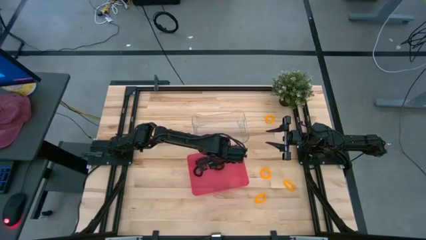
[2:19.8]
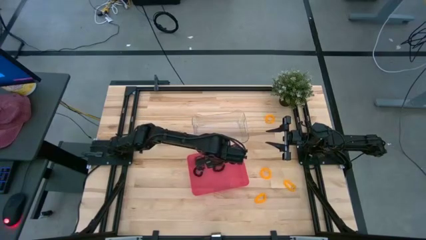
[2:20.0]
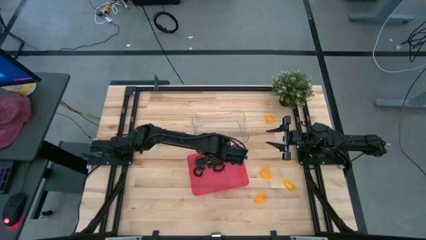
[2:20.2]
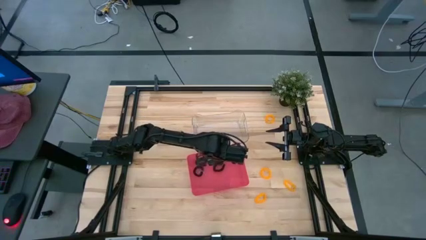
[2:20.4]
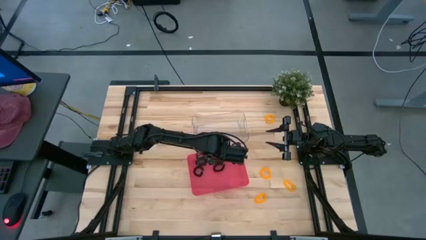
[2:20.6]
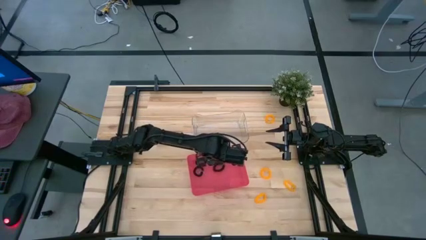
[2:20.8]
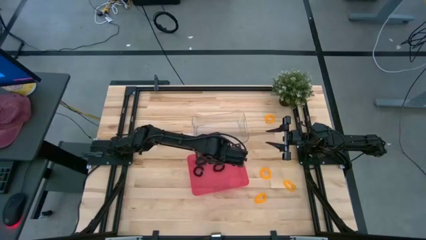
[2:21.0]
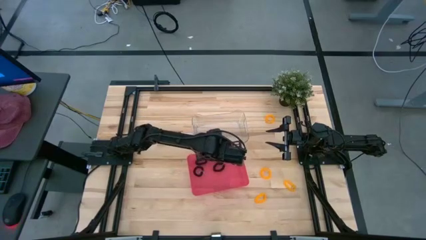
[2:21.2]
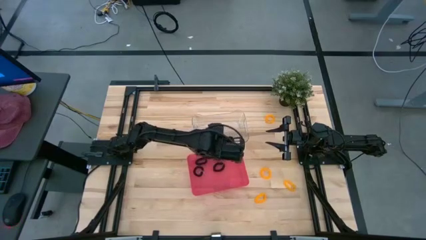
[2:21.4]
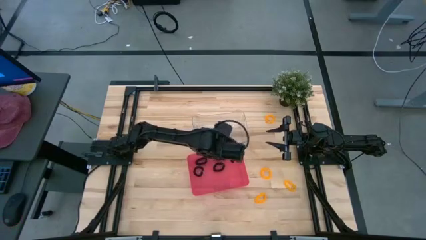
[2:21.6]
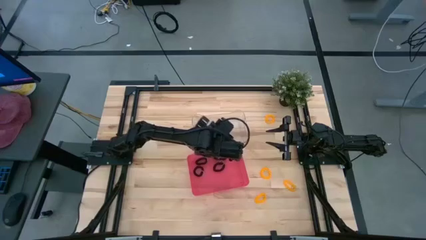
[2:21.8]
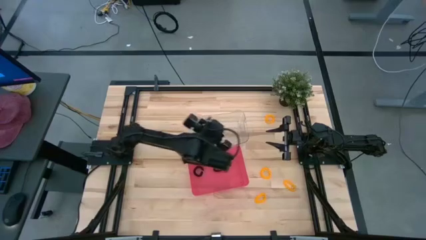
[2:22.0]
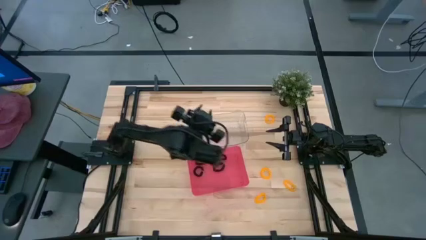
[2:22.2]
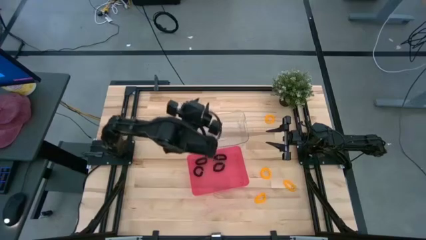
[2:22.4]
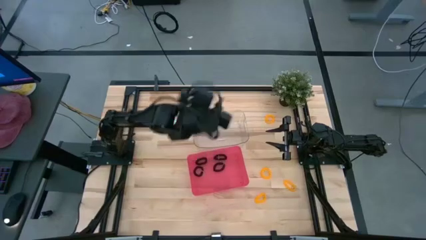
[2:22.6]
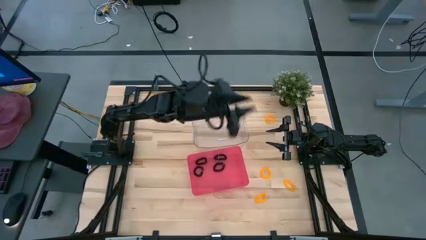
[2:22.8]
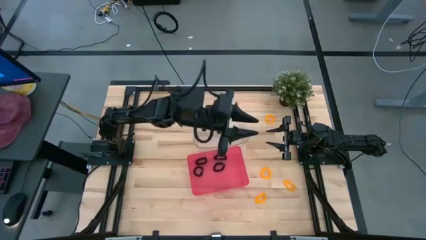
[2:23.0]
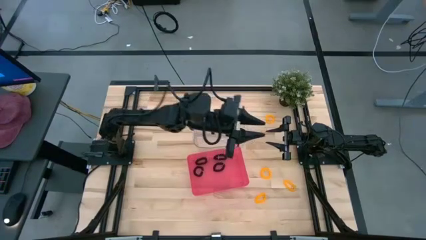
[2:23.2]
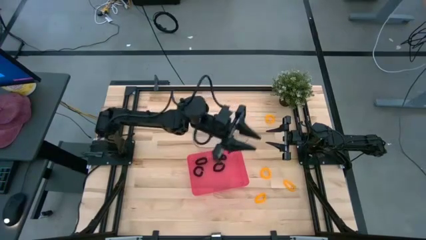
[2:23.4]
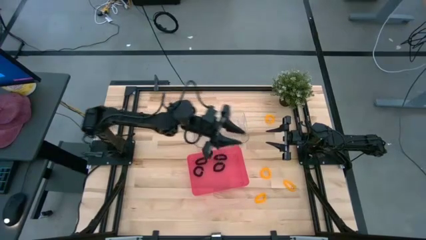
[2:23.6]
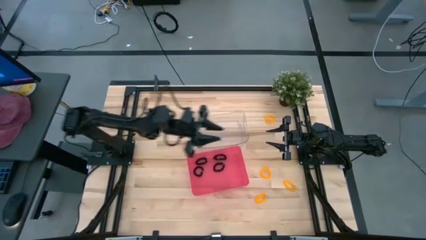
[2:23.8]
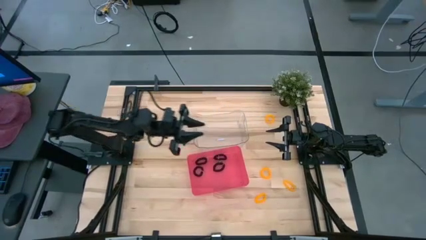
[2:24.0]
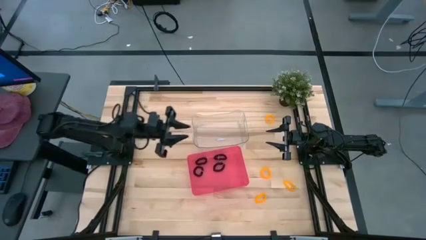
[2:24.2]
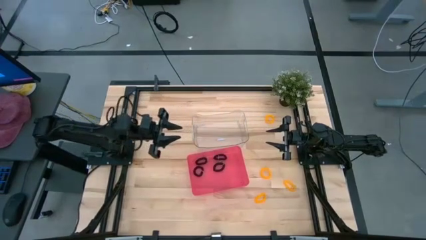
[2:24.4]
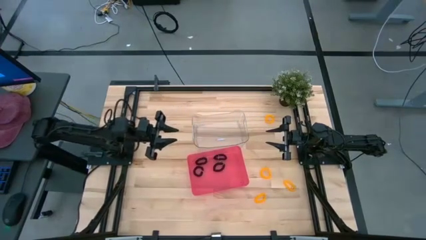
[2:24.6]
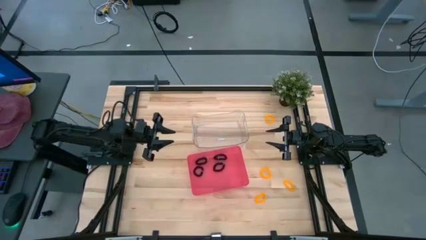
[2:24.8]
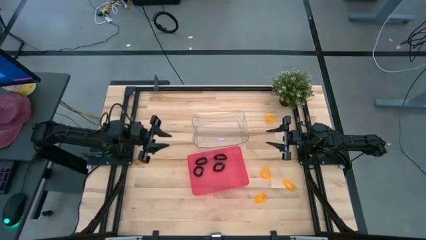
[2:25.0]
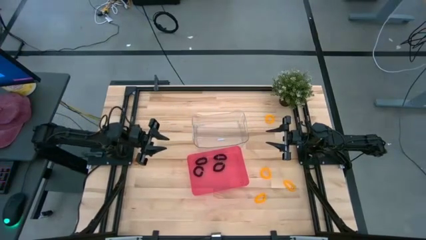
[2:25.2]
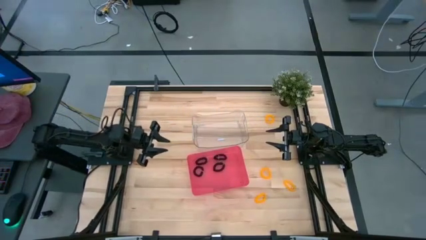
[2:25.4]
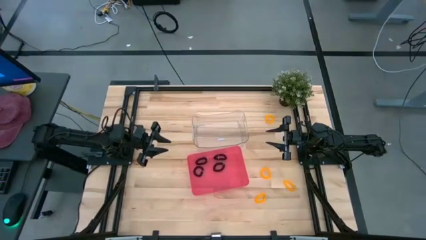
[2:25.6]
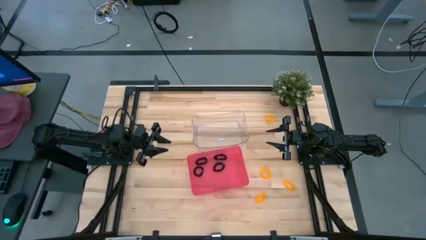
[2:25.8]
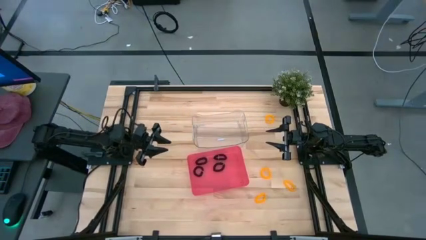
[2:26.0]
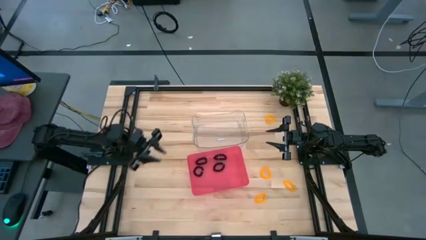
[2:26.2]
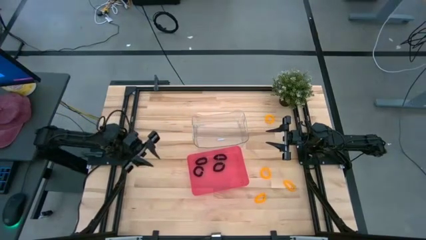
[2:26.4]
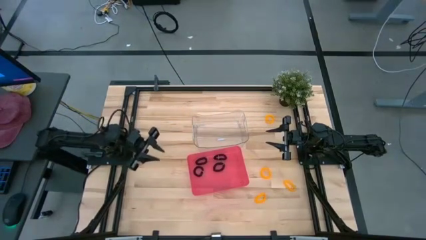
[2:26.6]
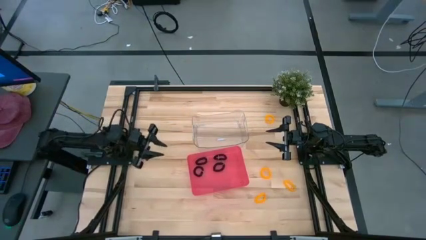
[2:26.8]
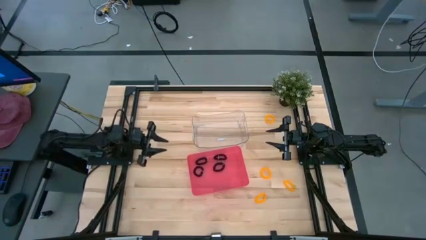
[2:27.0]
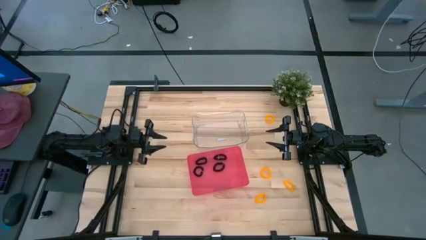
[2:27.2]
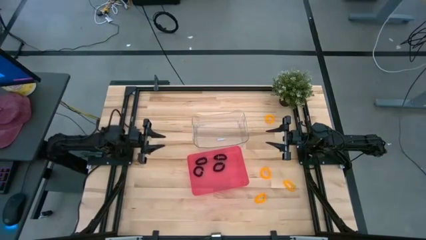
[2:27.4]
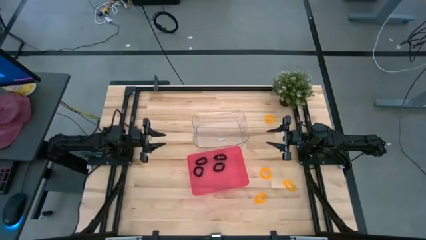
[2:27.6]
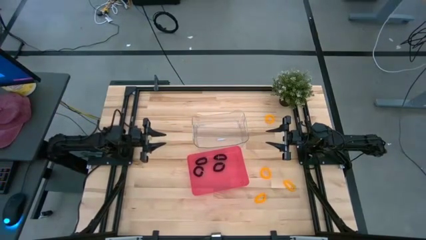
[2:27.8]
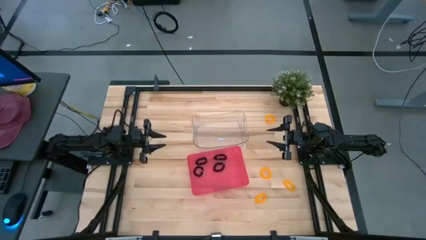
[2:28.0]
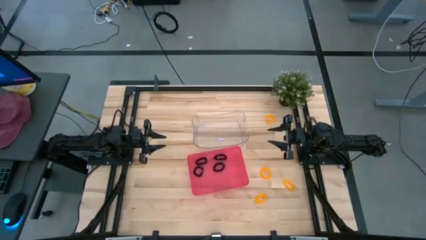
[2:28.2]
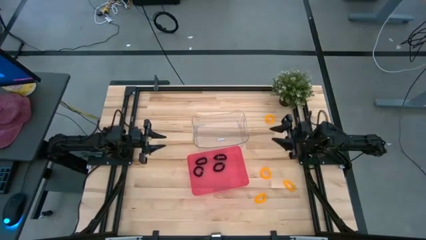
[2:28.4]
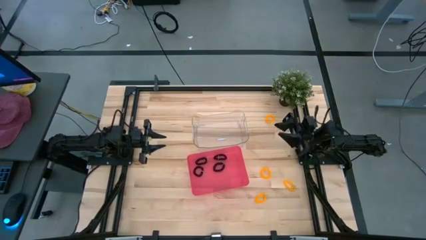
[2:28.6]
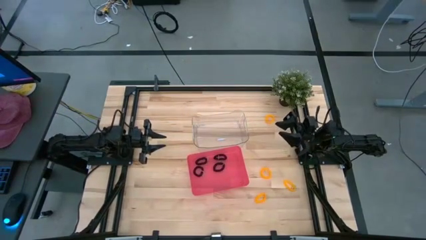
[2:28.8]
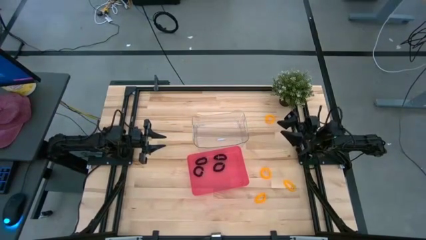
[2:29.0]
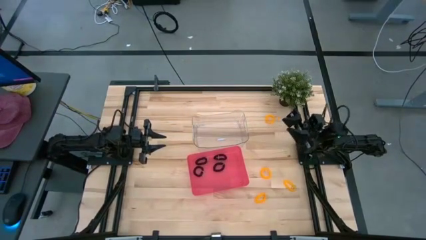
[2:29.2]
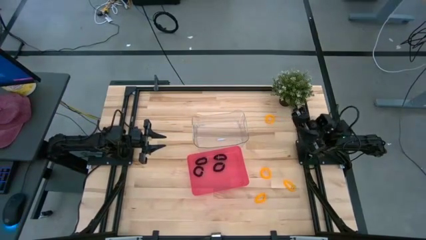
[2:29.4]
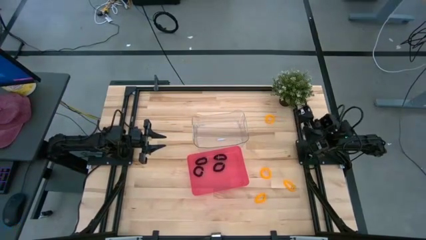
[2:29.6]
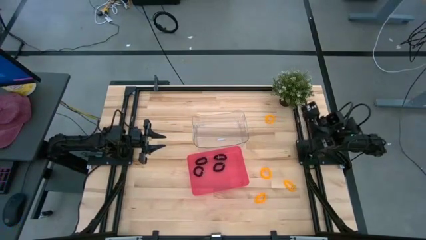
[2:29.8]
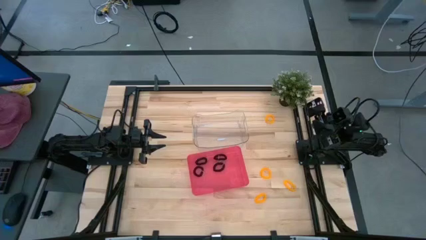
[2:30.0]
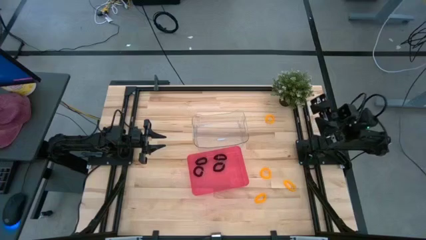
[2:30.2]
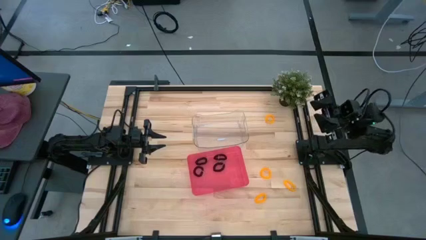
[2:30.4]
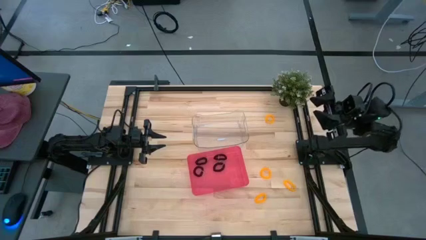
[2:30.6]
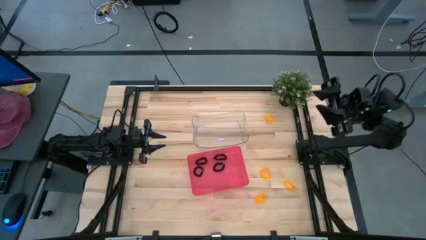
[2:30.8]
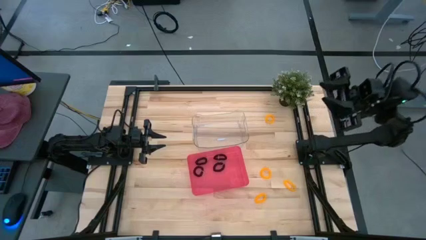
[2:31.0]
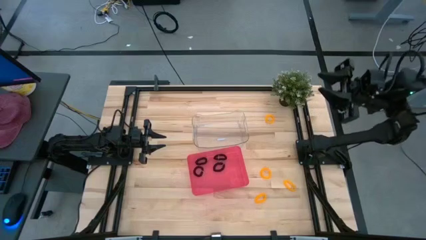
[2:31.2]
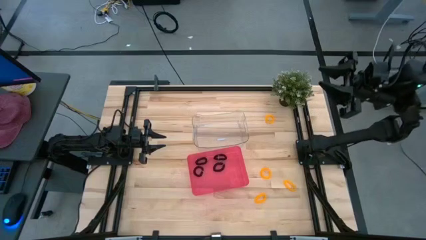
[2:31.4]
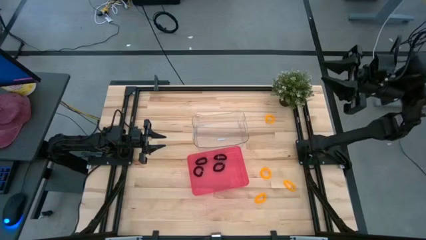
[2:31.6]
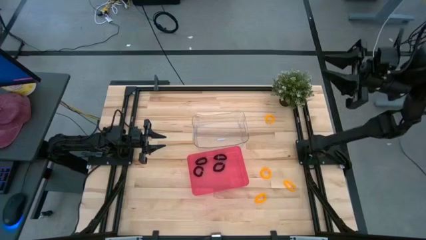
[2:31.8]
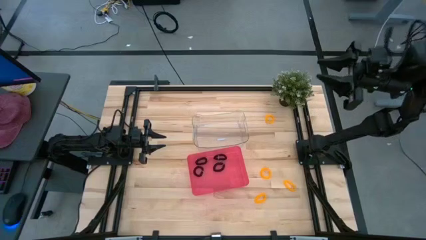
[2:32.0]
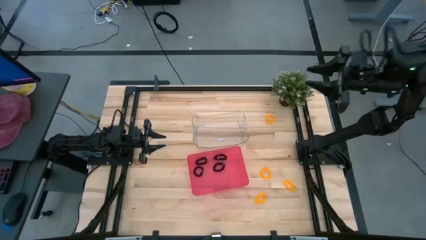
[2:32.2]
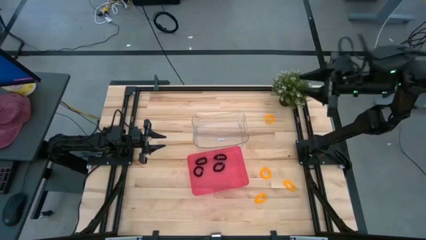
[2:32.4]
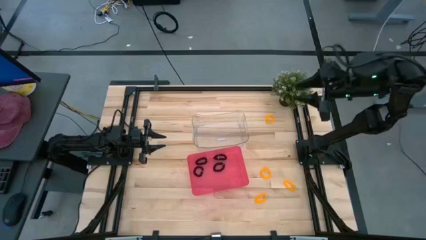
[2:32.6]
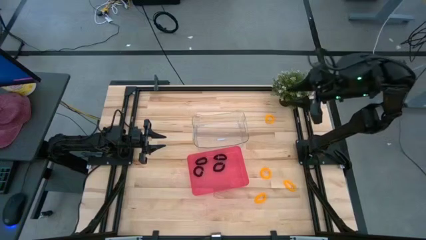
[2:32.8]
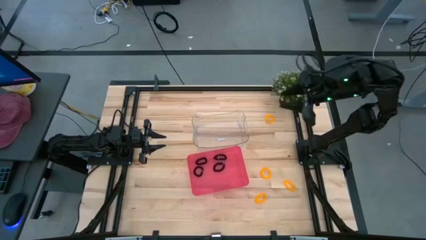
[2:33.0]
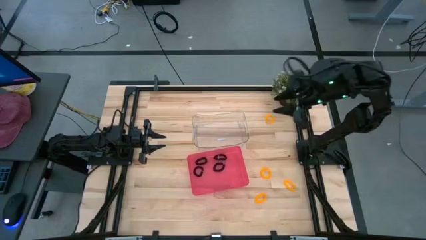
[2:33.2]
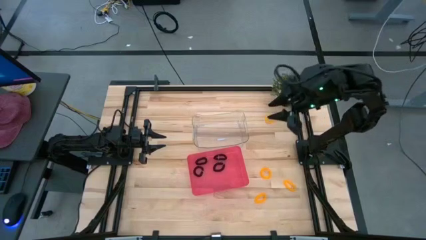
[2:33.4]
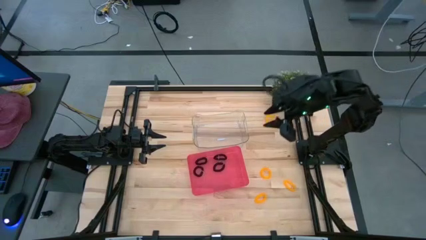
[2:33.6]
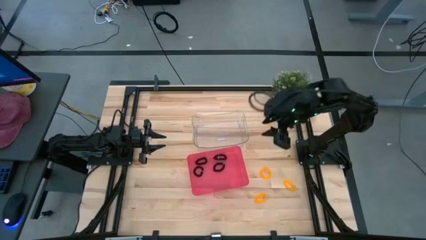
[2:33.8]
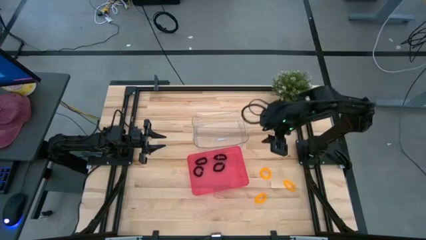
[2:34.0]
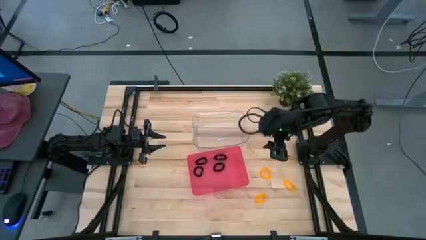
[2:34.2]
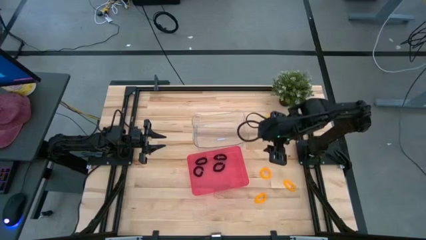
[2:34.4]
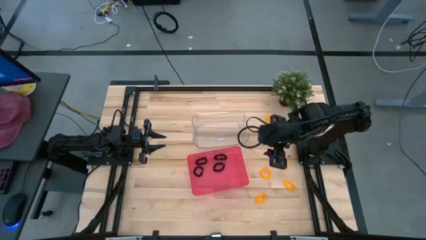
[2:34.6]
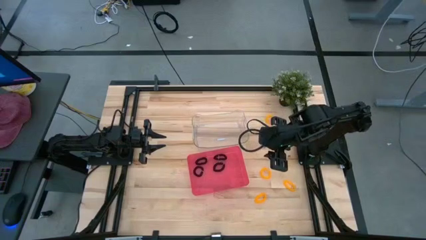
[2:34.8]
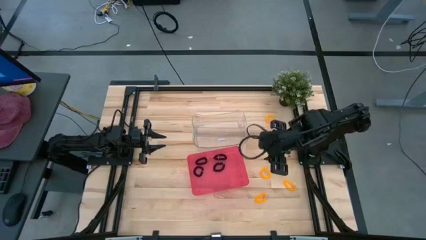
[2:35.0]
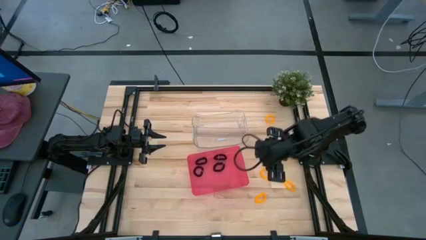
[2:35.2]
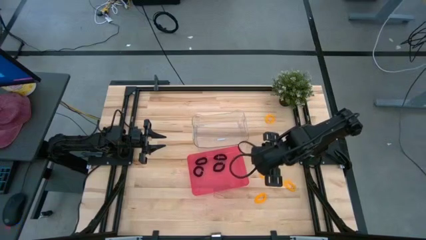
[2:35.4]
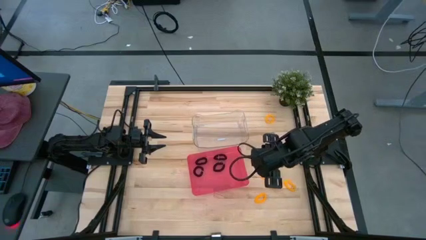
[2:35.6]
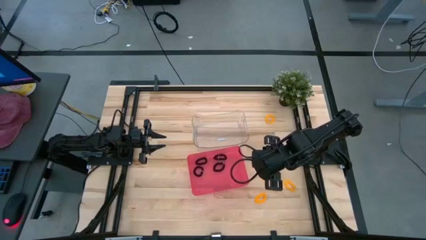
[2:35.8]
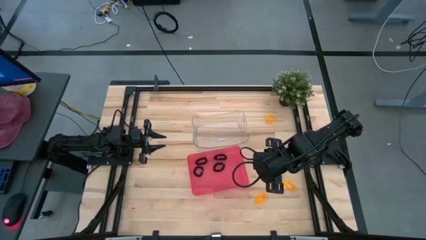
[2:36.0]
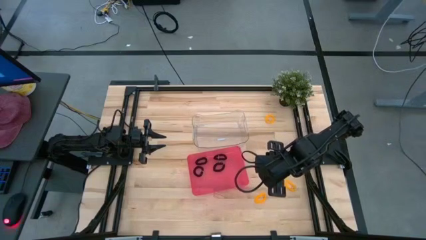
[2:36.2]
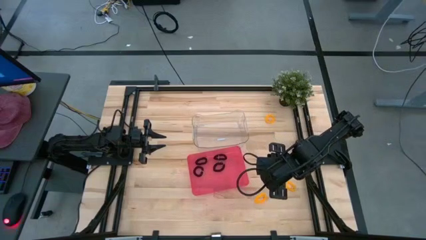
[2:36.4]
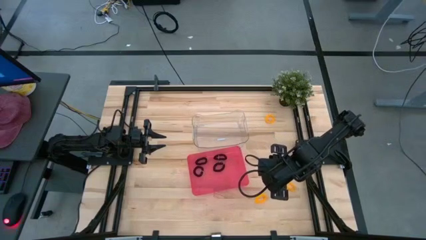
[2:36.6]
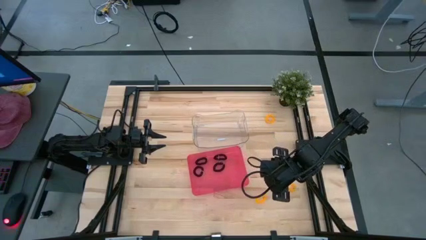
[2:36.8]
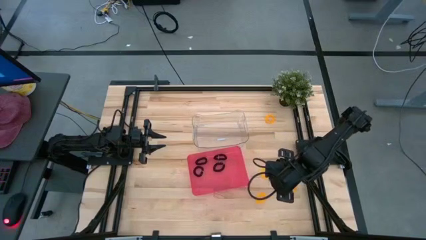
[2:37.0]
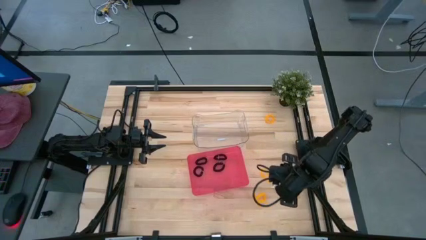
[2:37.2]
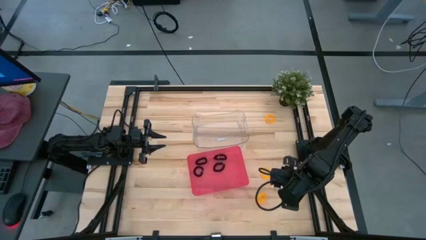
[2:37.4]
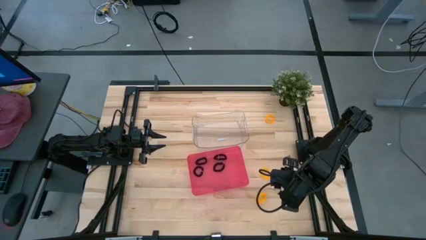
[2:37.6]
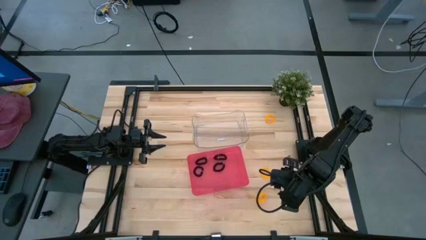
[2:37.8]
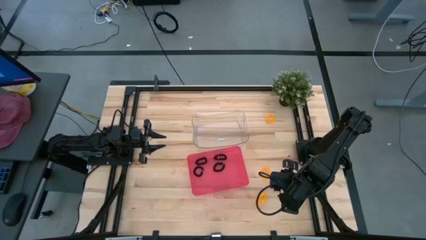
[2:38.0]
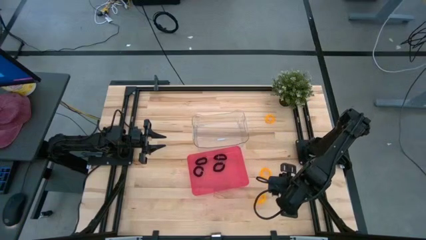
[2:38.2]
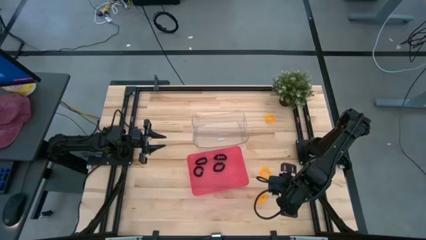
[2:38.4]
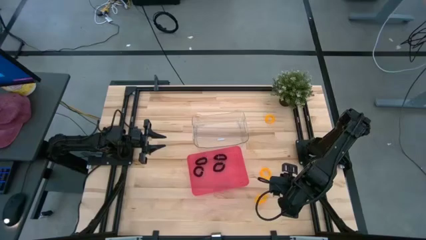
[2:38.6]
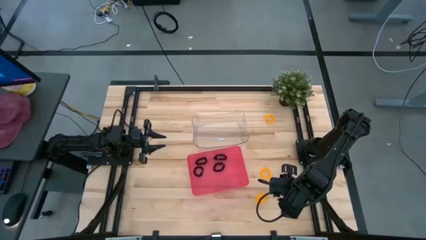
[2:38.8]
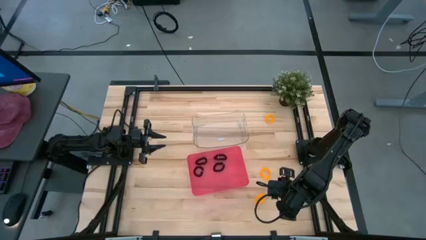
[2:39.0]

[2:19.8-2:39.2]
Task: Sort spring keychains
Put the yellow spring keychain into the transparent bin
